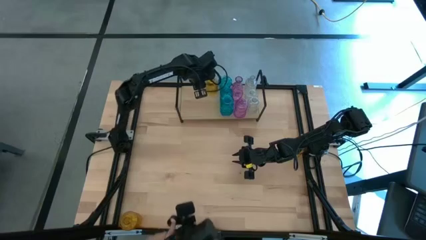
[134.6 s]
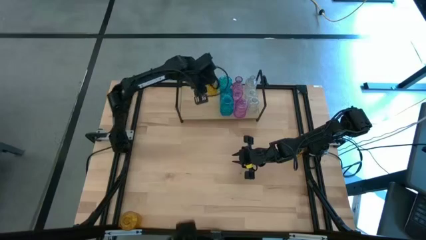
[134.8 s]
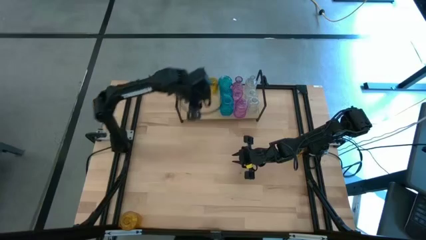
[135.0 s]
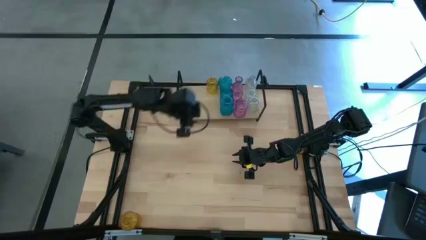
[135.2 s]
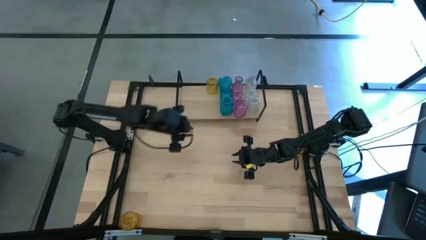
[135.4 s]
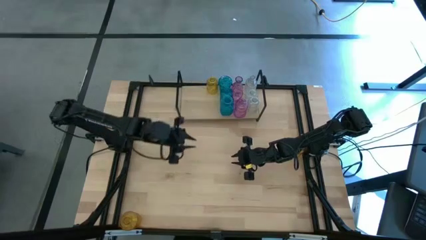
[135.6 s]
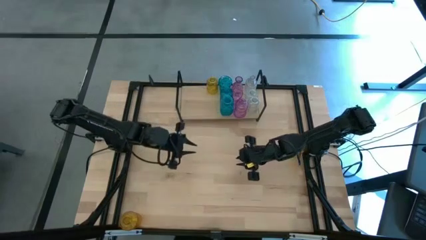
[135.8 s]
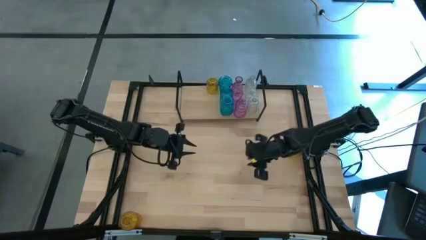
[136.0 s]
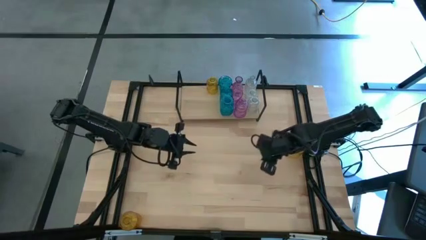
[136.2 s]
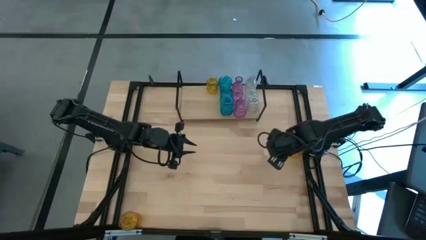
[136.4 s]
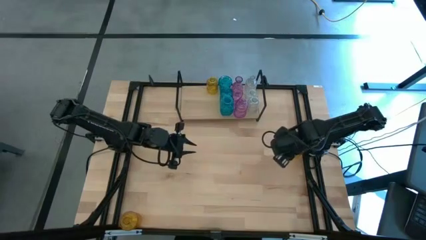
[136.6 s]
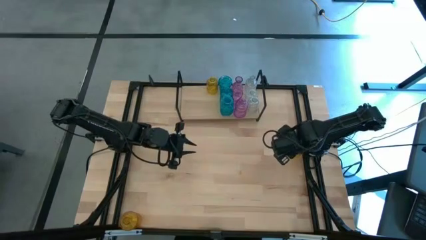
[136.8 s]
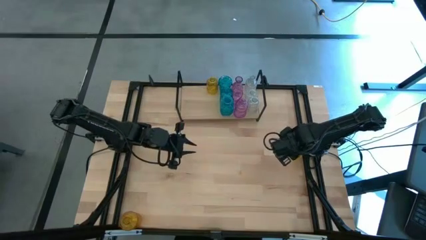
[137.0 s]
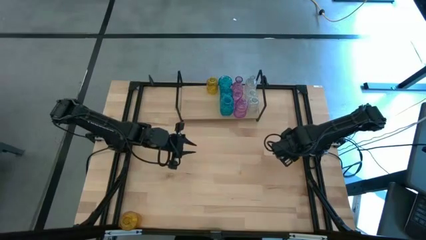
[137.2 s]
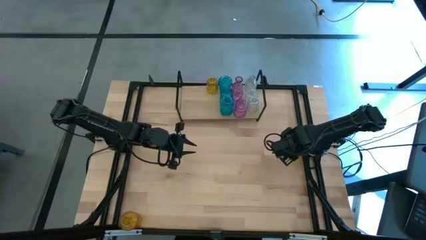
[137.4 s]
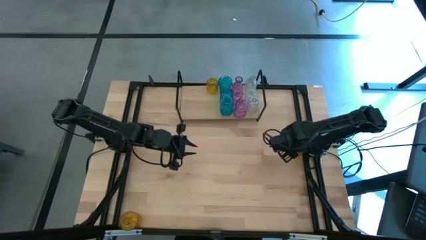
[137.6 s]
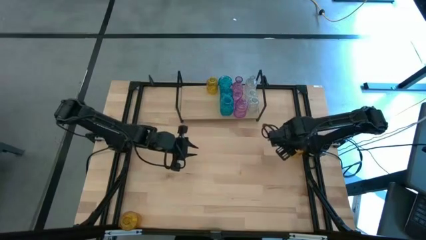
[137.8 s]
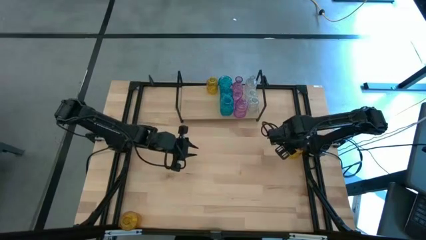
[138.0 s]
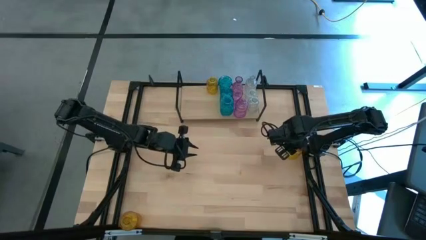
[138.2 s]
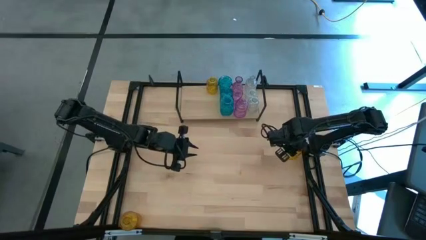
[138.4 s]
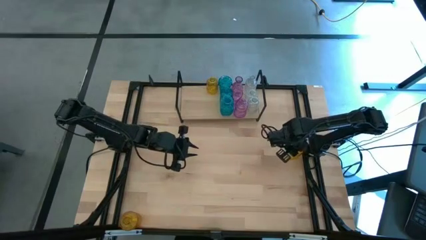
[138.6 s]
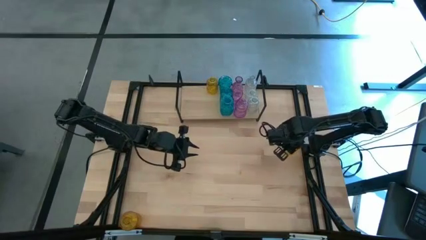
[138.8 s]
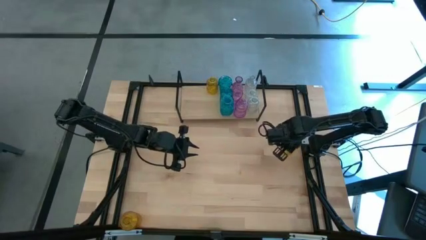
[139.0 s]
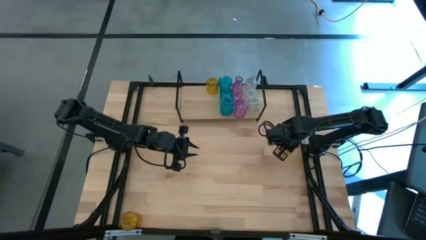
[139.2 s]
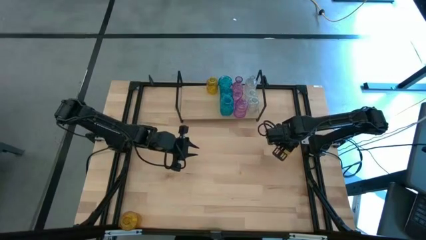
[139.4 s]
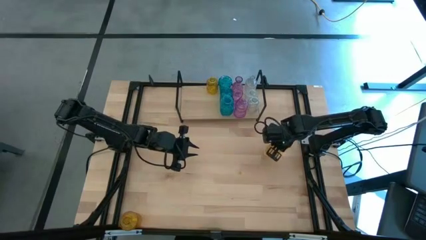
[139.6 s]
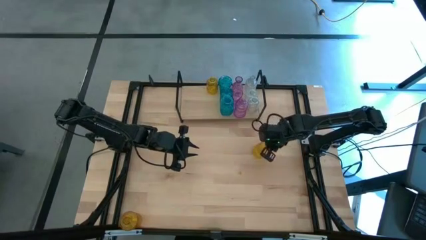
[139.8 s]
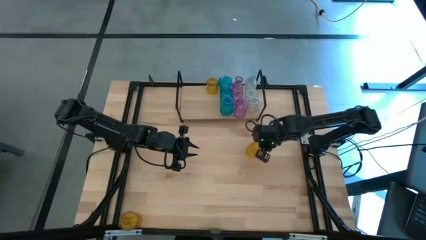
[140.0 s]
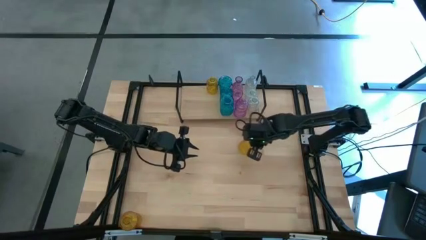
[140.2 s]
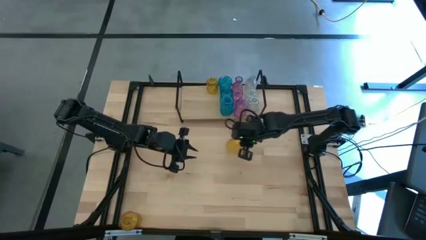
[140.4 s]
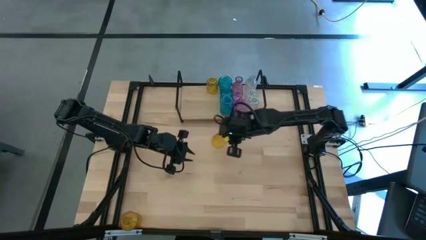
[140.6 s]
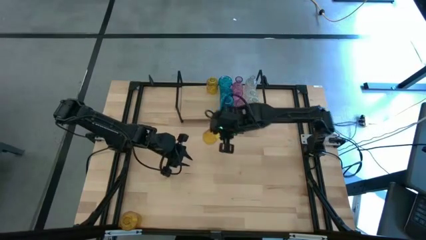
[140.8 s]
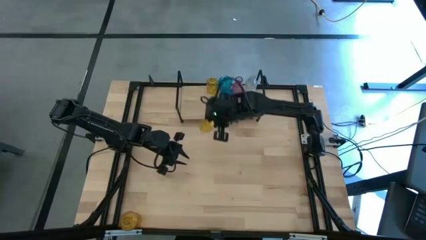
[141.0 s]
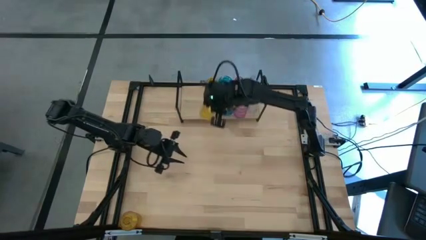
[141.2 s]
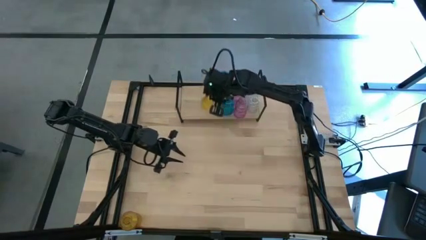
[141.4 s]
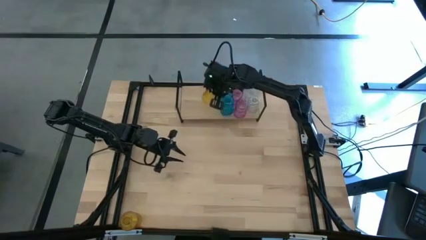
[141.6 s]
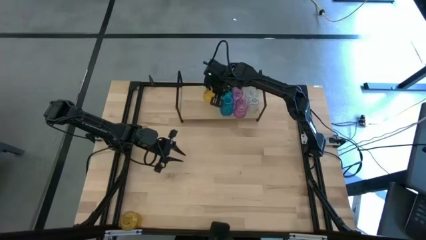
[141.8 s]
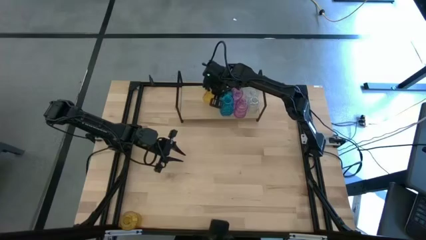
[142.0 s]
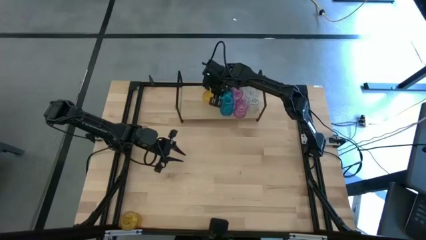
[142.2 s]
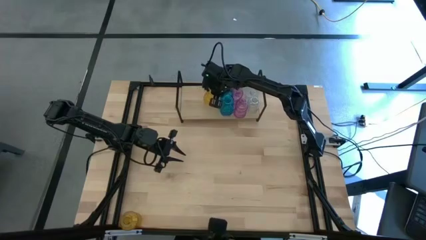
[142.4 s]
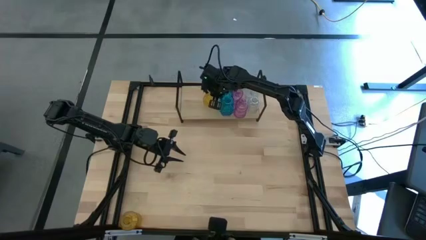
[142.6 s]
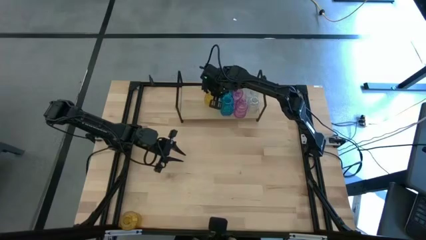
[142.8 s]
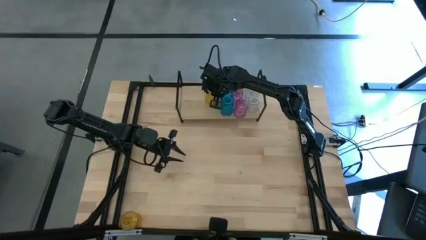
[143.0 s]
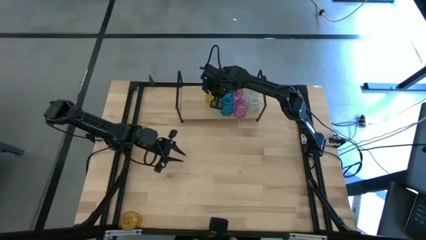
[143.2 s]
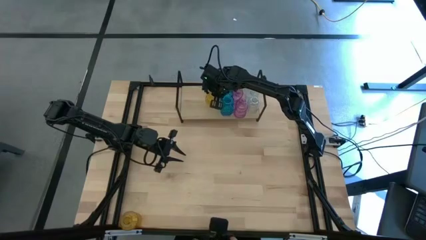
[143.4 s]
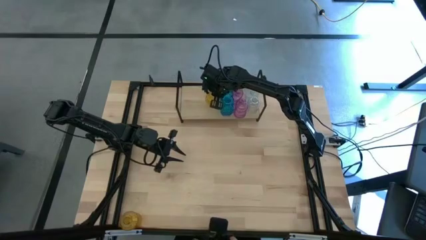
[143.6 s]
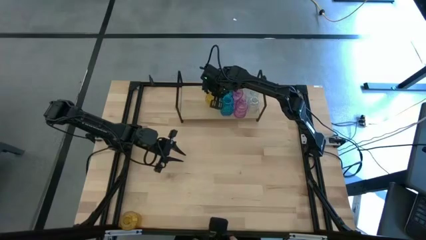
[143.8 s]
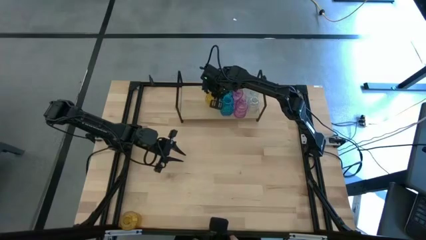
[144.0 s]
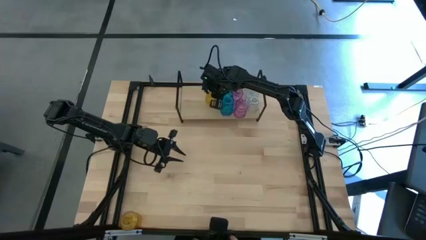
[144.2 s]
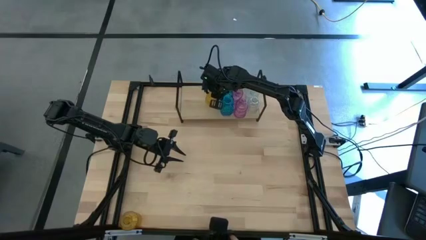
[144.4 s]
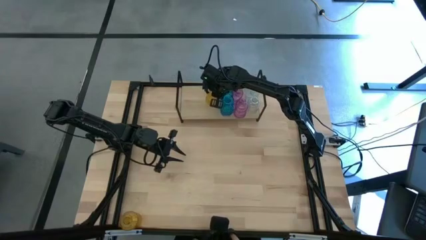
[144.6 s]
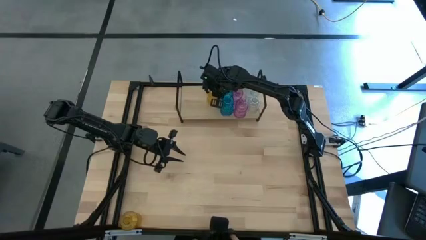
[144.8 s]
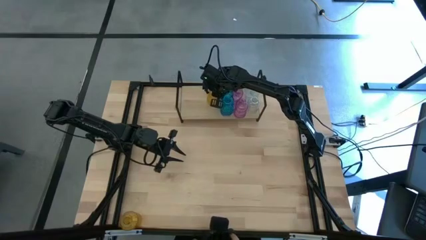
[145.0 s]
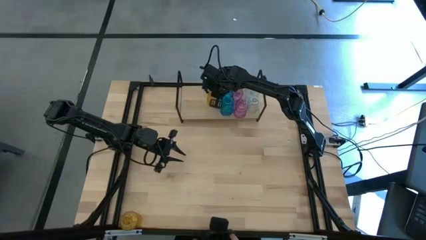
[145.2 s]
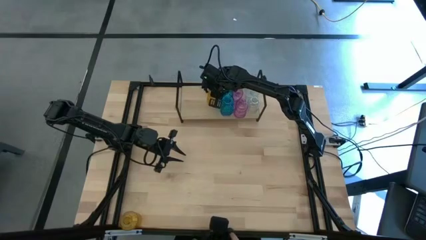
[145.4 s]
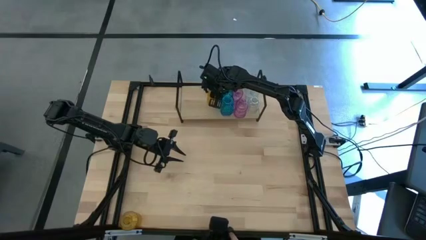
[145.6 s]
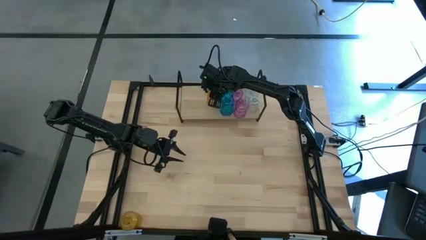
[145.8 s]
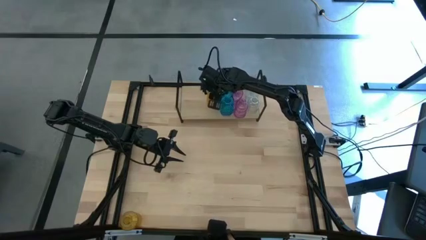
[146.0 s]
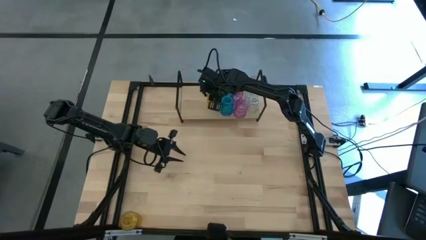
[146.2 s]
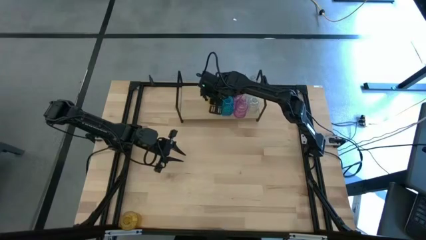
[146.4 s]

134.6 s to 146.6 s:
Task: sort vases onto shelf
Put the top yellow vase aligned with the other yellow vase on the shelf

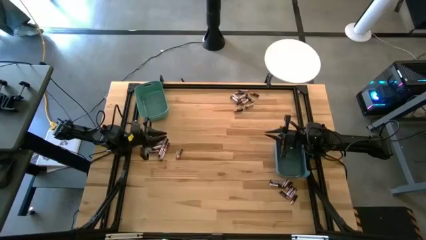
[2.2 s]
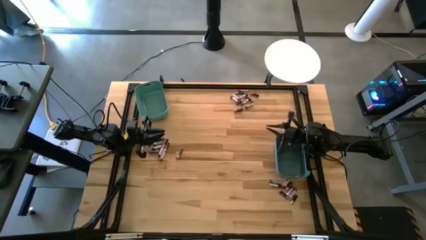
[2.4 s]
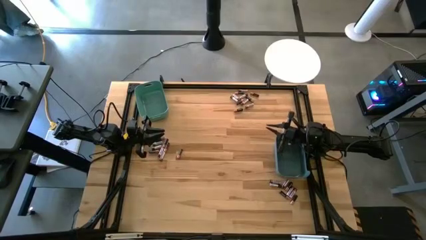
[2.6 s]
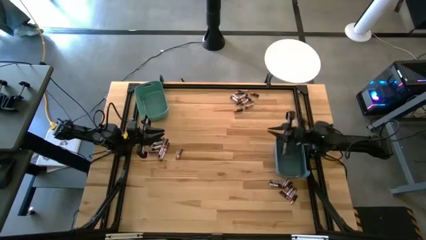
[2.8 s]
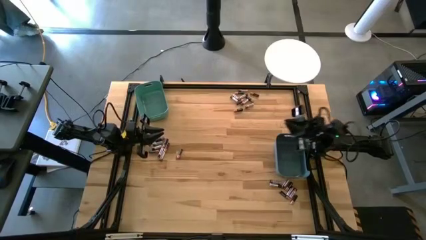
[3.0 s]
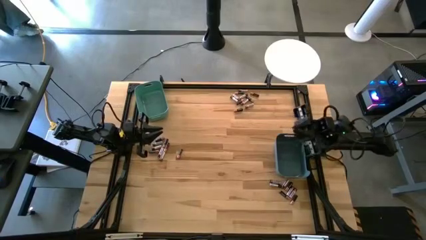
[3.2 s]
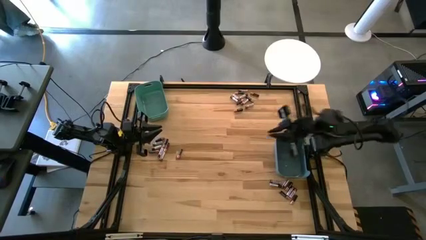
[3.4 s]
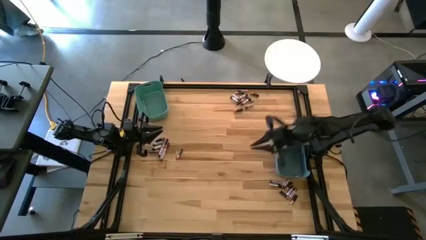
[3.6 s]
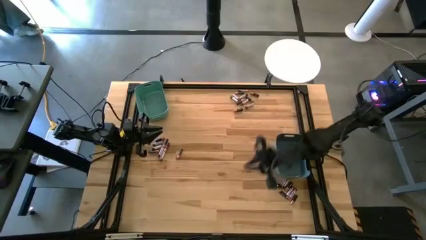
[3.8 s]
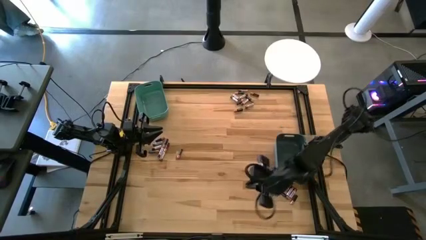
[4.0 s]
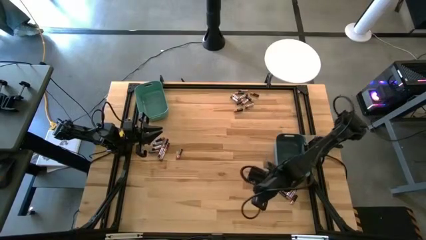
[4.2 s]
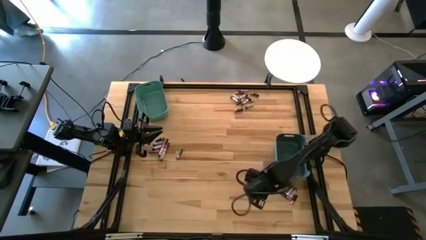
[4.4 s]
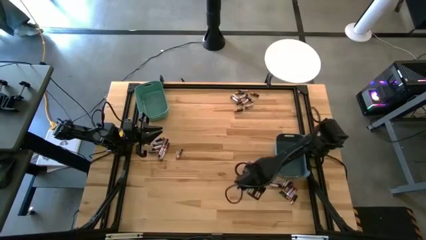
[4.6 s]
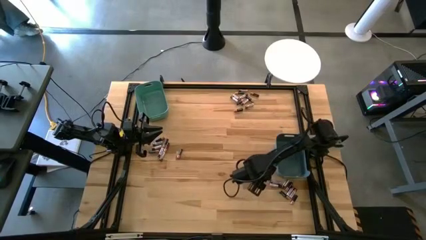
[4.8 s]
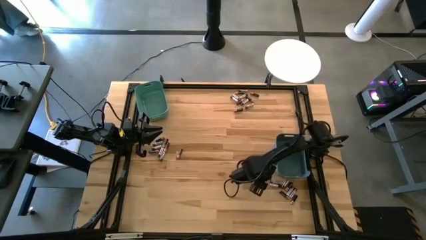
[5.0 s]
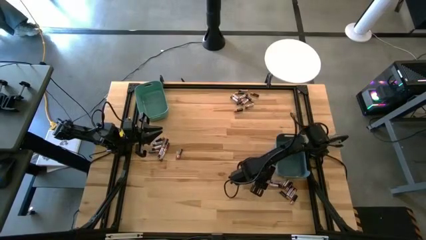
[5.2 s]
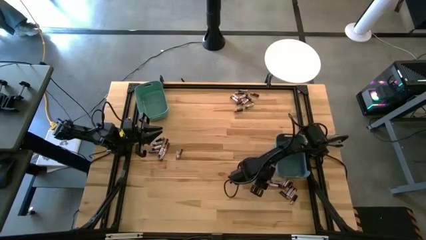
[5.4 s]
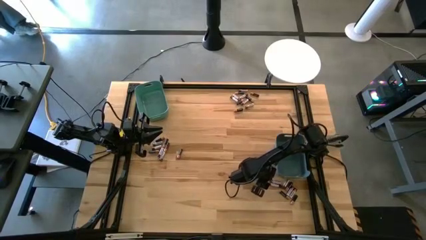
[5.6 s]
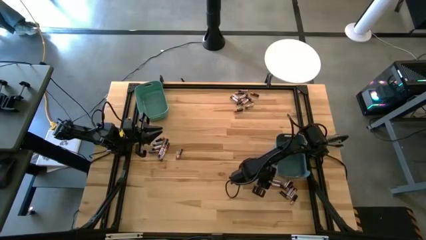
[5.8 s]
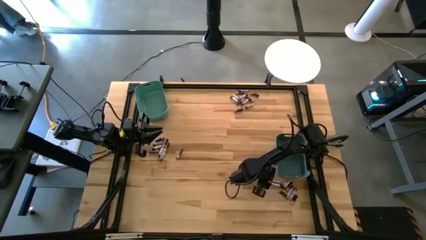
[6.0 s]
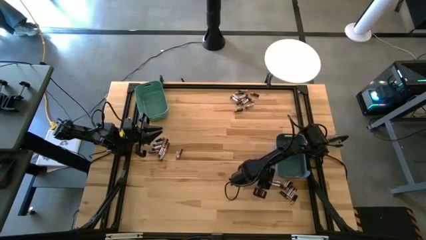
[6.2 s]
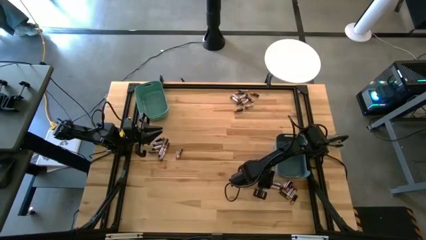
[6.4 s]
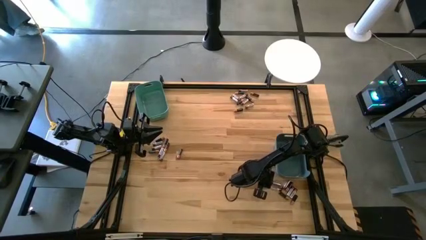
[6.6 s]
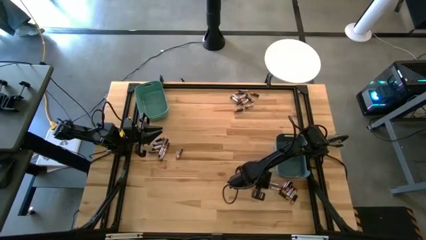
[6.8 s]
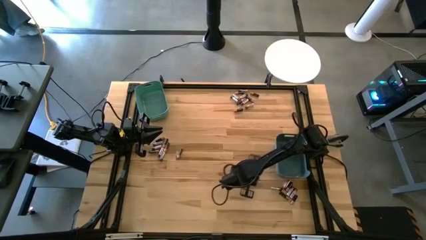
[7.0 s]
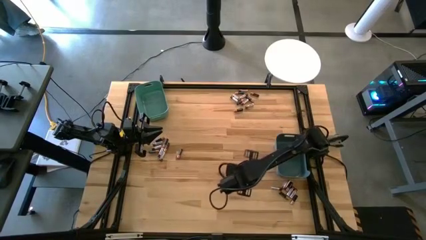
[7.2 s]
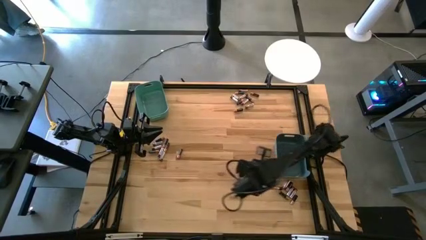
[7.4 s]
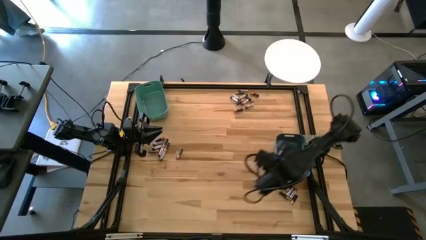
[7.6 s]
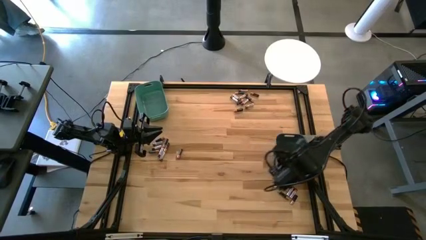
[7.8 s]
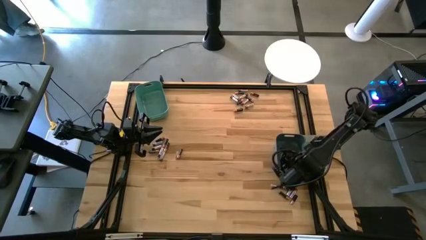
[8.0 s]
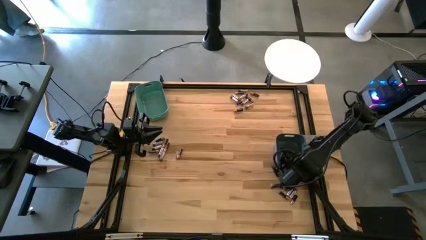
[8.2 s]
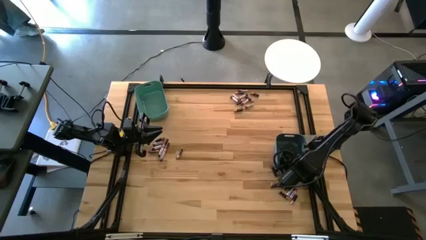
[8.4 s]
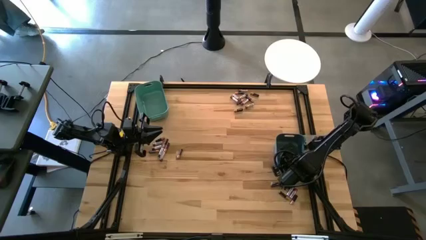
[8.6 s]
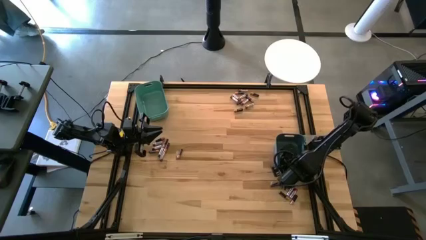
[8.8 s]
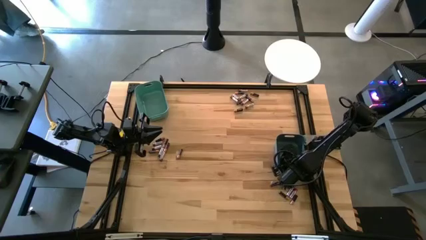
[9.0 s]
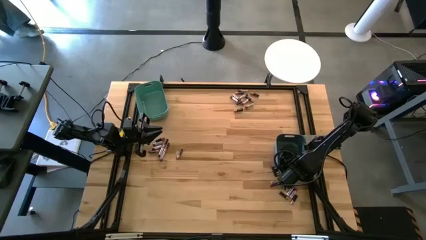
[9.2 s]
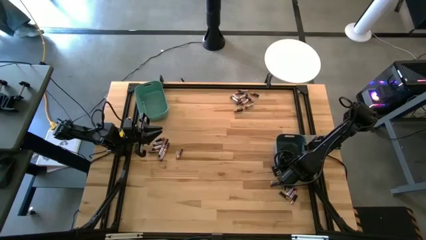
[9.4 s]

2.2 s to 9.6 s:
Task: Sort batteries
Put the silver battery into the blue bin
